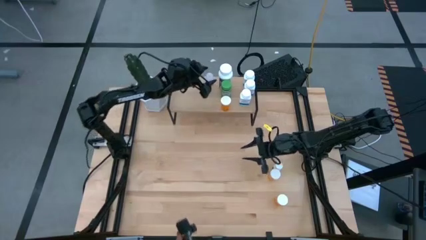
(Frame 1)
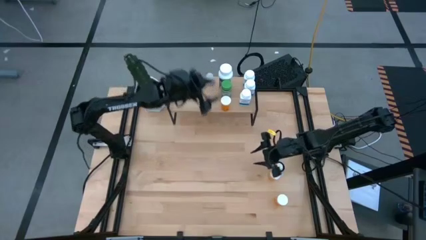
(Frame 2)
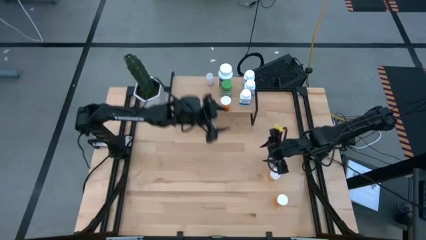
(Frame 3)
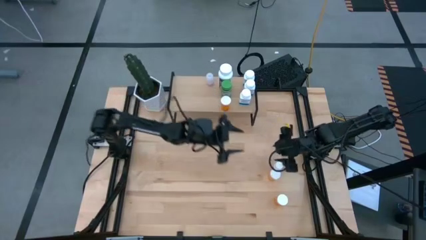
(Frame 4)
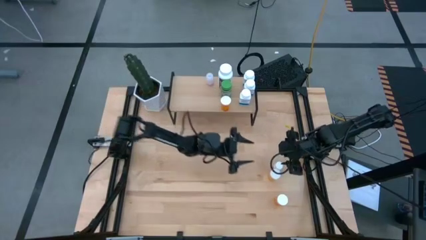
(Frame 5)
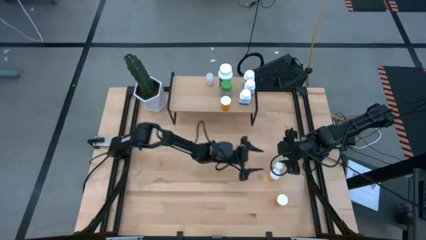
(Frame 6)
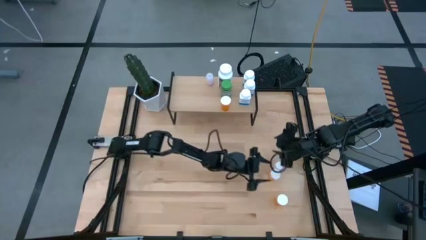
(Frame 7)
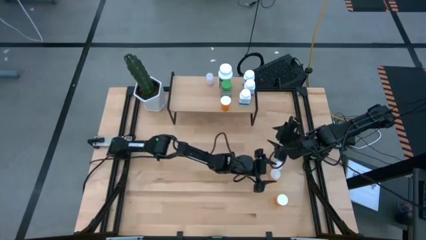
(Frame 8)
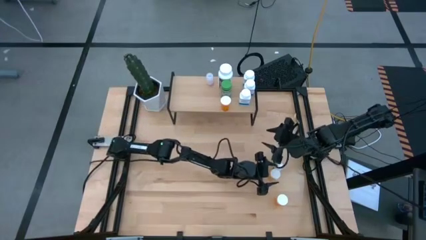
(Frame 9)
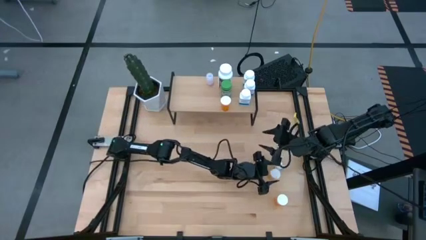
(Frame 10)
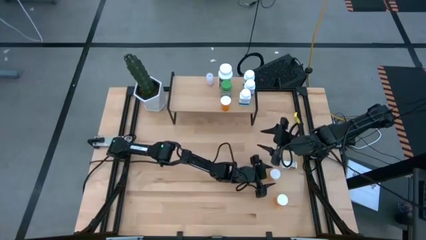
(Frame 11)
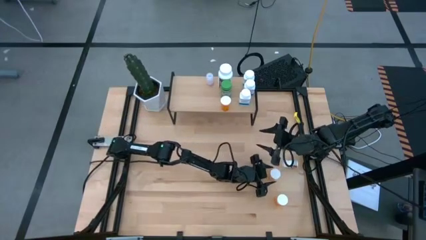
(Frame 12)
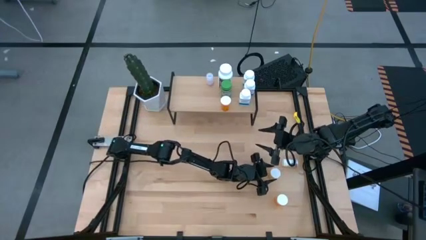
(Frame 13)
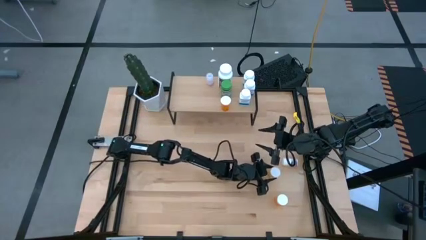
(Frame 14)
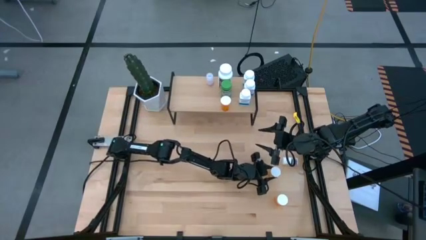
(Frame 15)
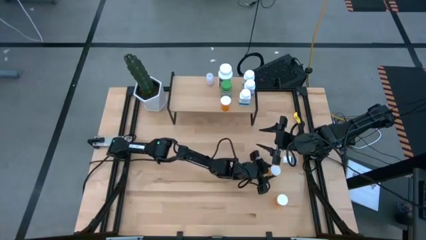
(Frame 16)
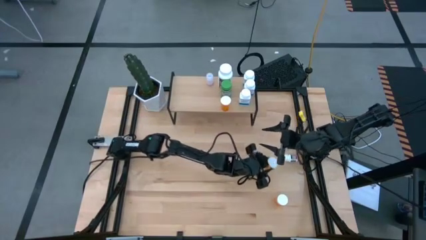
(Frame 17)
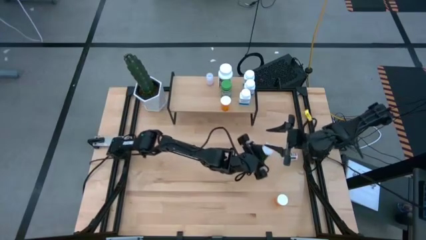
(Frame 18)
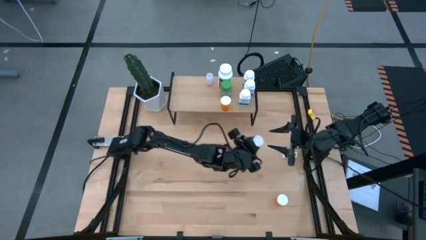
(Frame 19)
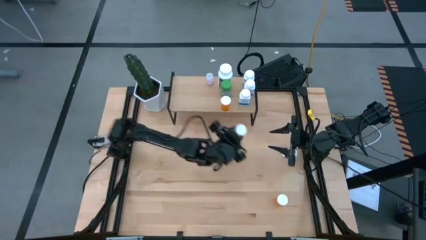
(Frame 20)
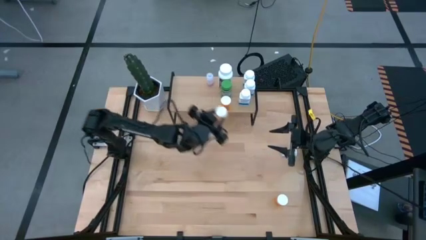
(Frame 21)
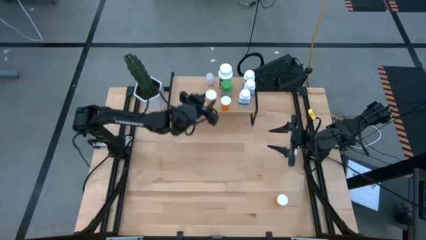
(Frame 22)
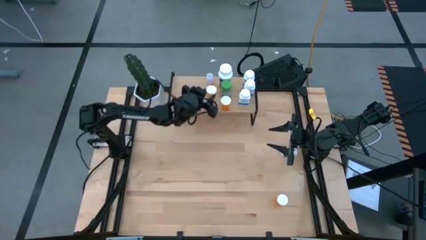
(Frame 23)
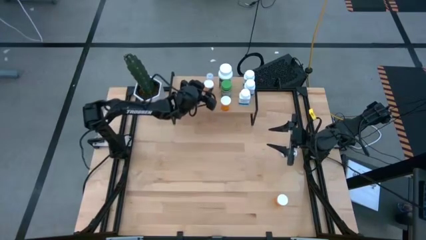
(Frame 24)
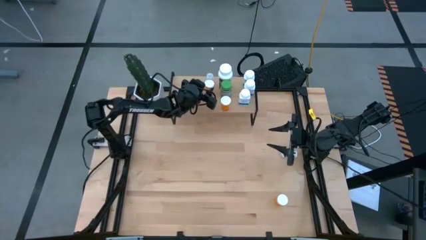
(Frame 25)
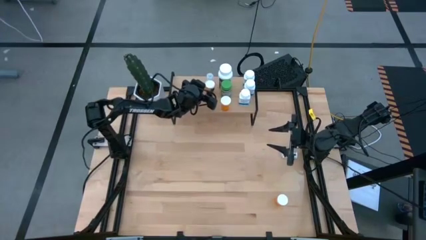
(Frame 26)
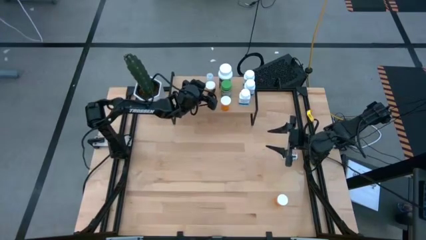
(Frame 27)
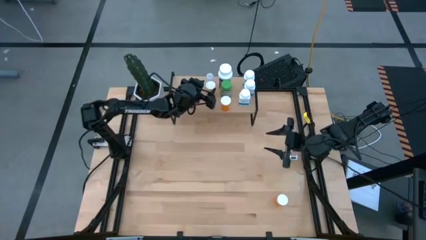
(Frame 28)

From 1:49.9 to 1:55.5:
Task: Pick and place medicine bottles onto shelf by color
Put the top orange capsule bottle on the shelf

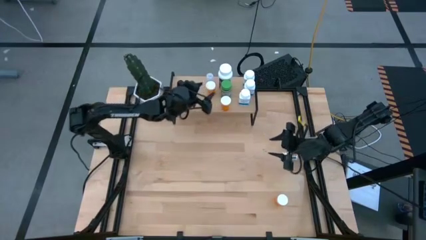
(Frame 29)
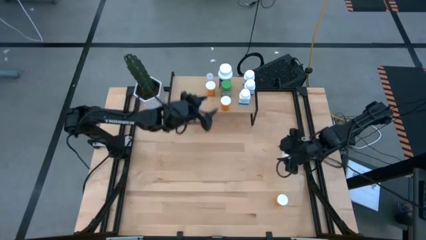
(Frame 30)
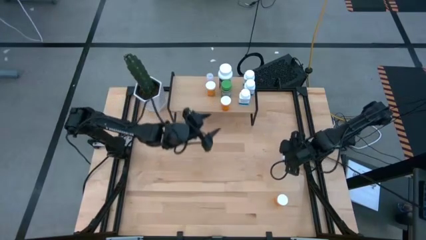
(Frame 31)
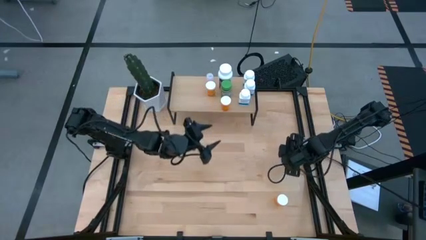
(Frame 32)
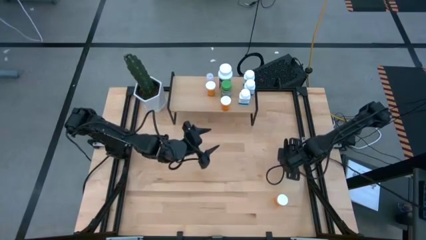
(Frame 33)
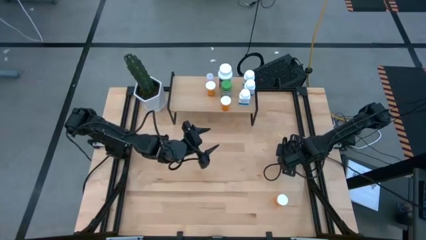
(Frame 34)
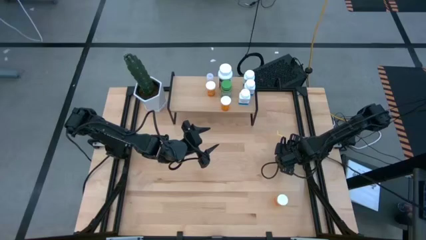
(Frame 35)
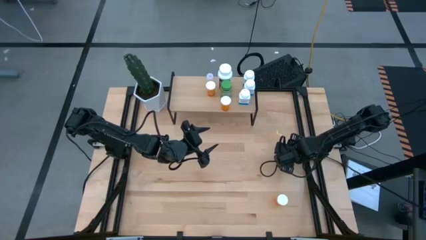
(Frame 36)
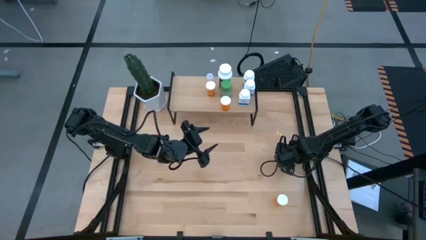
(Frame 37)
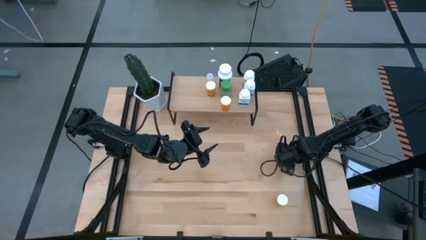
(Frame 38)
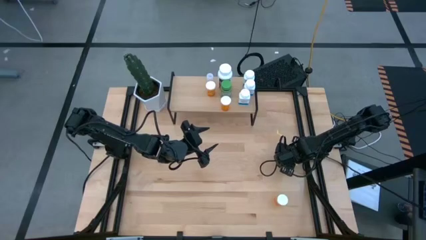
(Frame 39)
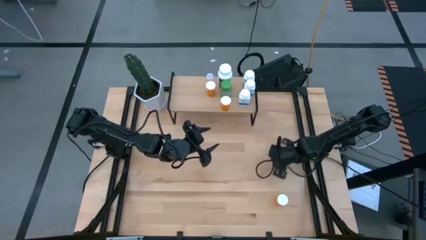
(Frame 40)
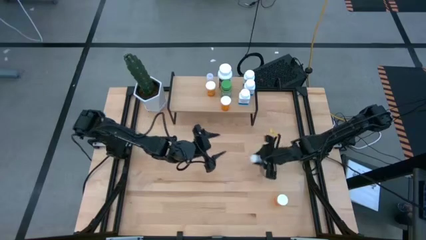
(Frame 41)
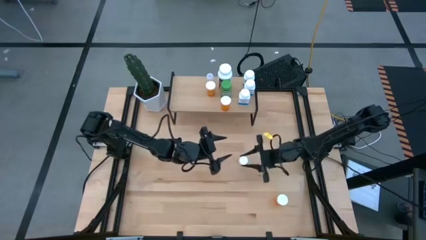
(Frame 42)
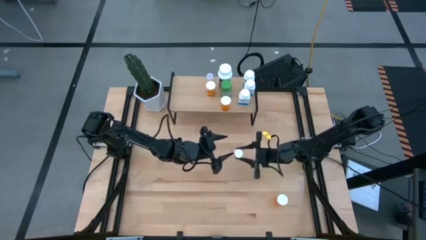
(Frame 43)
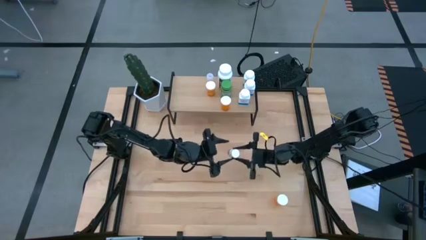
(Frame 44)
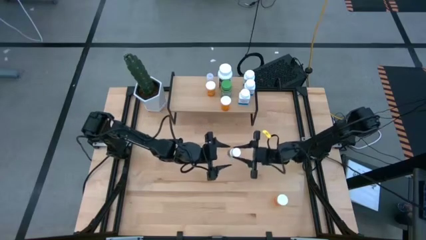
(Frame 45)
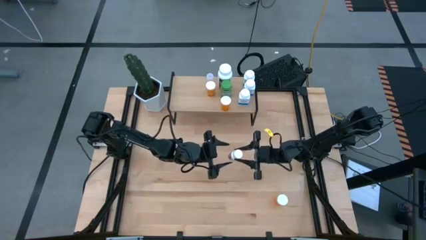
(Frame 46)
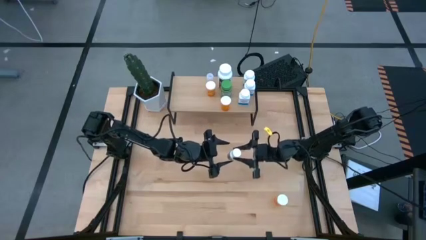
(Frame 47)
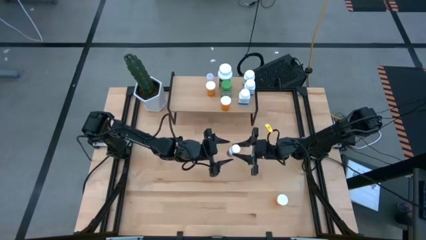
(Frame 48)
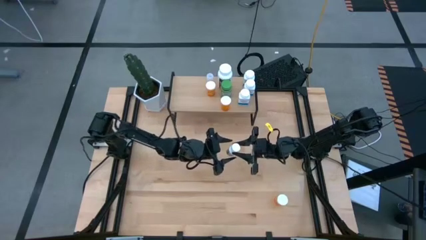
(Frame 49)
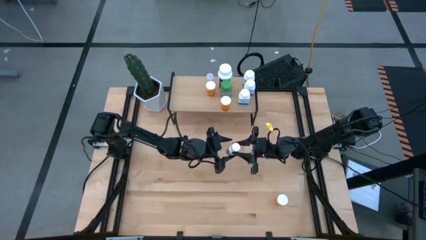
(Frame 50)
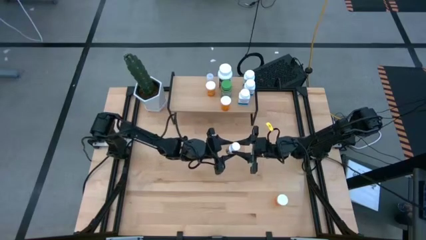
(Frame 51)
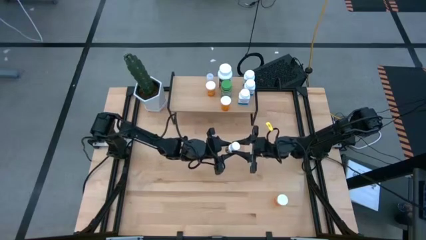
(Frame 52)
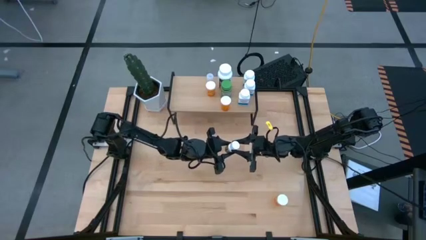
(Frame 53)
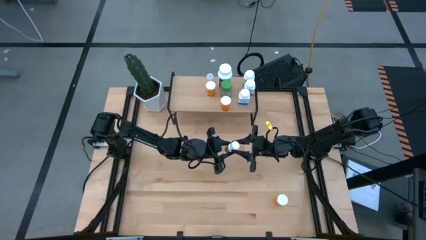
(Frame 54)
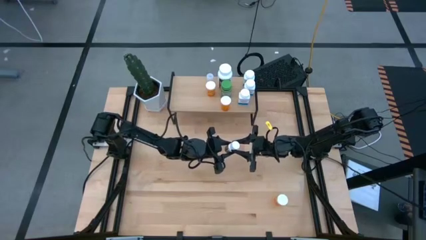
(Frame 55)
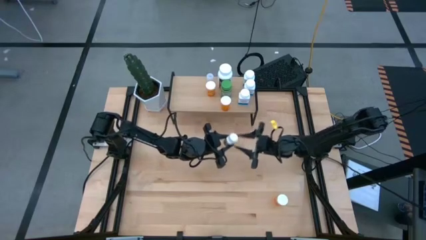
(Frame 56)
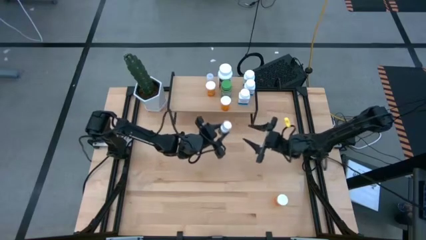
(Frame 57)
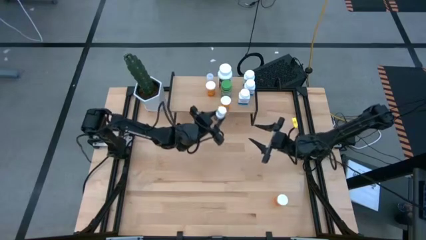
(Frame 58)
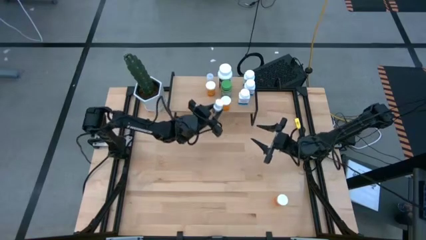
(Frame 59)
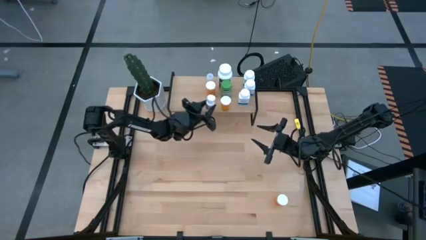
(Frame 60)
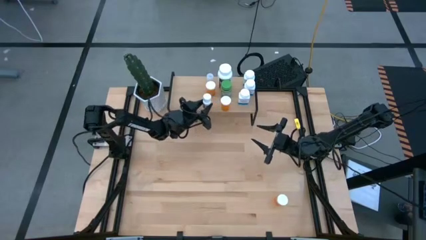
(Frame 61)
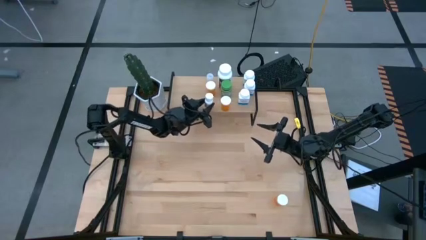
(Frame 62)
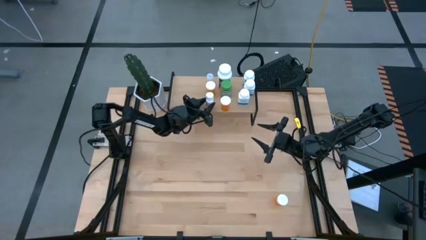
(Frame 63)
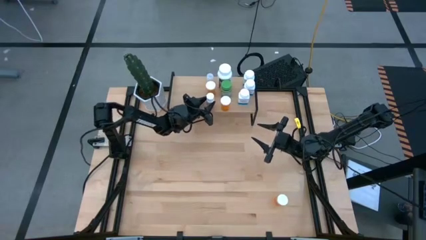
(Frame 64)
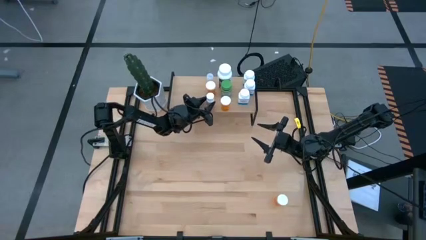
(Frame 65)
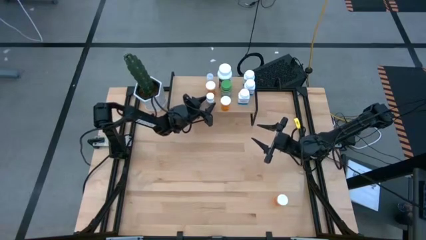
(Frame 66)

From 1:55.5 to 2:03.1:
Put the white and black pill bottle on the shelf

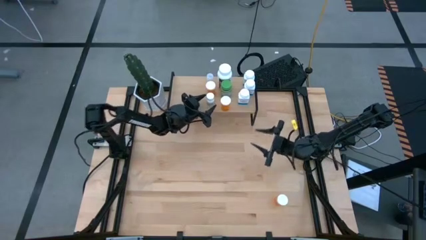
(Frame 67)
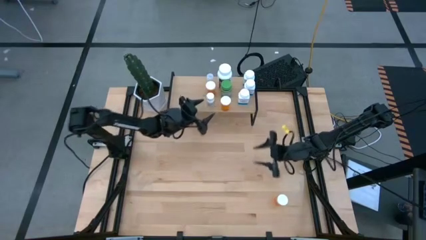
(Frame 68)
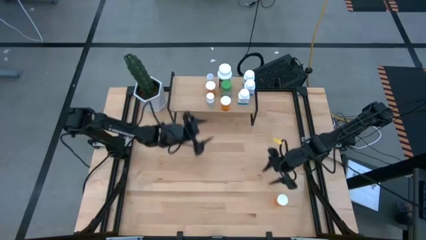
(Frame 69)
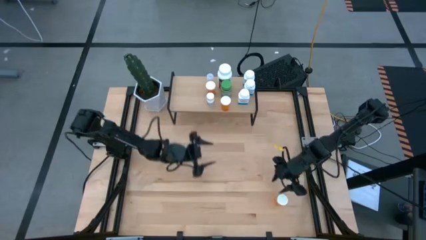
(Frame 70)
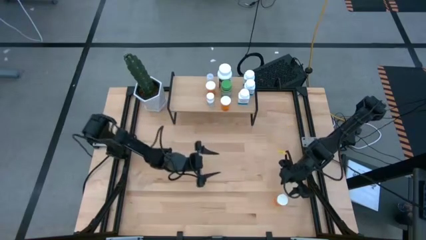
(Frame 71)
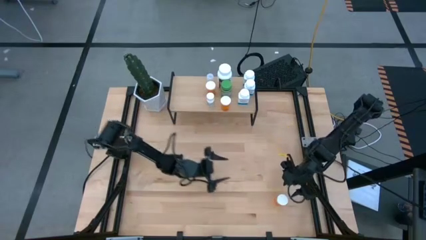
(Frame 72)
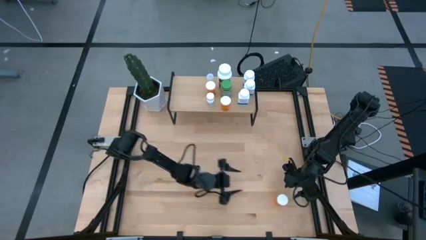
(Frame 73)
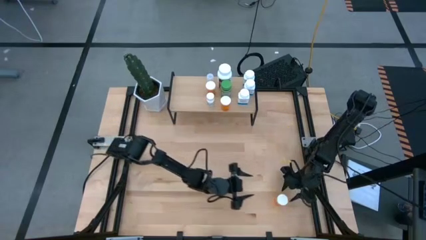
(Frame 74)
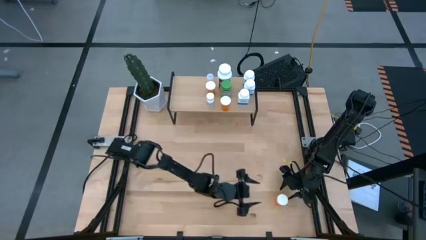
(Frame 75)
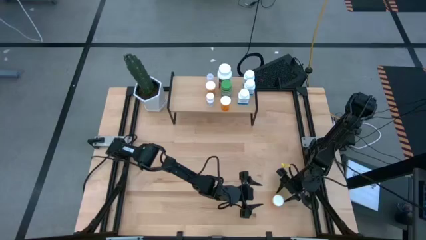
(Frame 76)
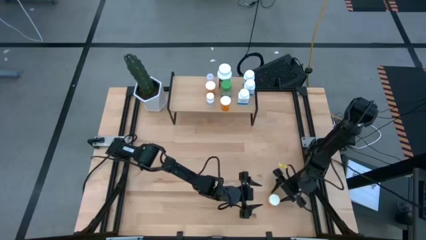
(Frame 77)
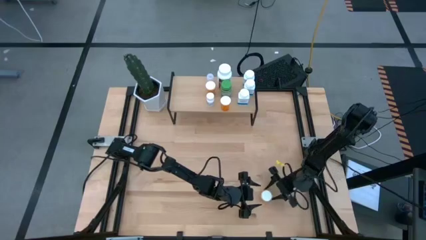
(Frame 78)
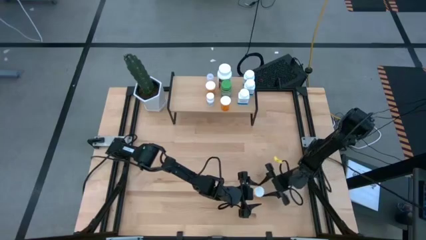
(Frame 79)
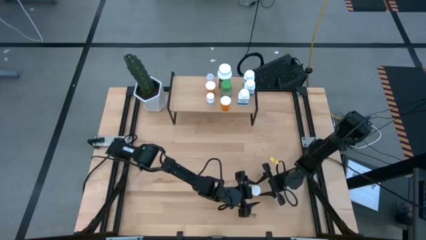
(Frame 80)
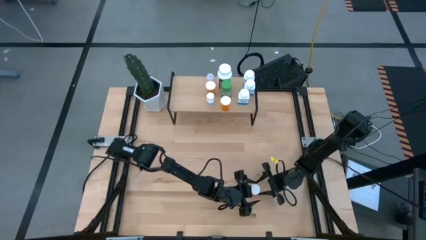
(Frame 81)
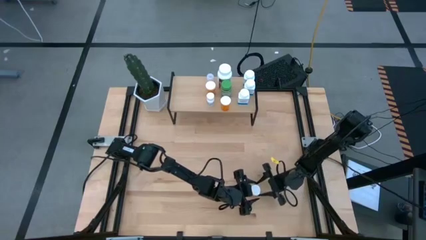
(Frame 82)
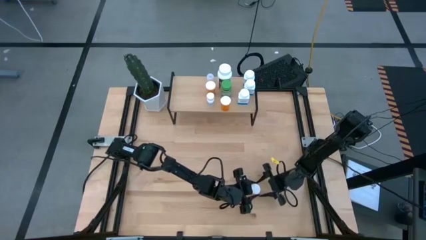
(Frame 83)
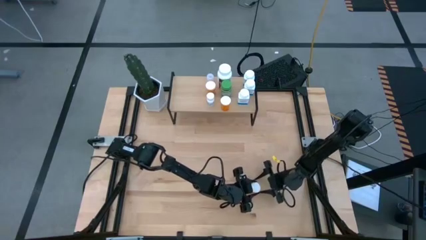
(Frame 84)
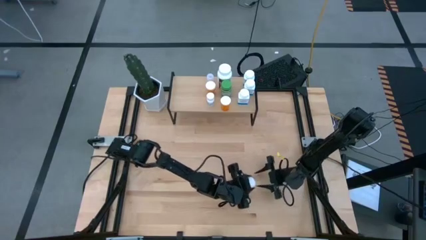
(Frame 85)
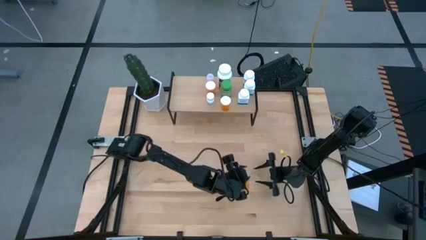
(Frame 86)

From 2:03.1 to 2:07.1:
Put the orange capsule bottle on the shelf
